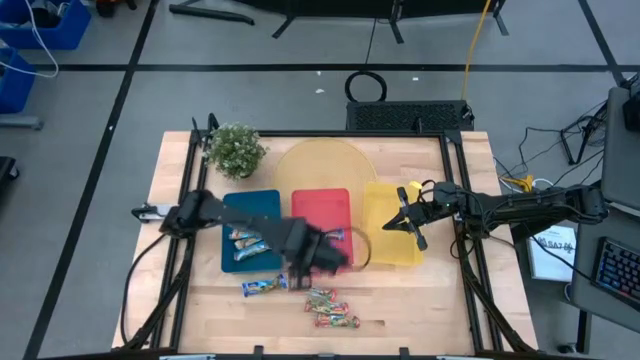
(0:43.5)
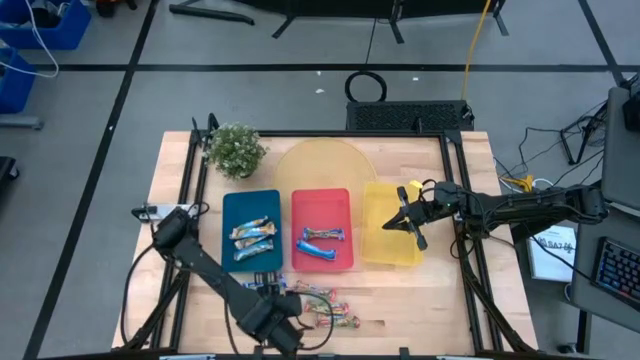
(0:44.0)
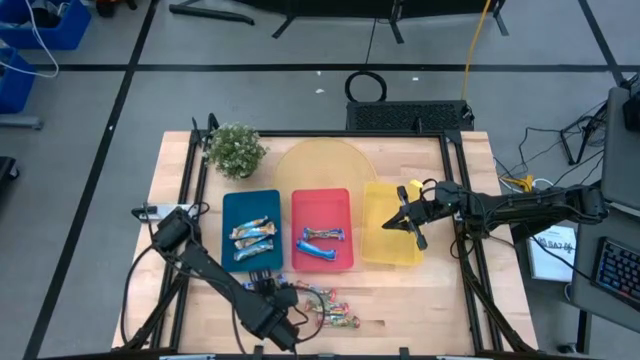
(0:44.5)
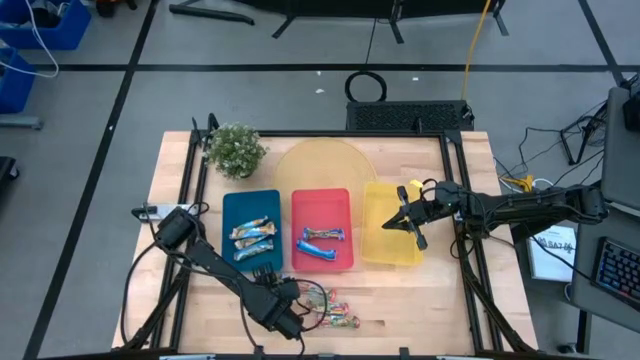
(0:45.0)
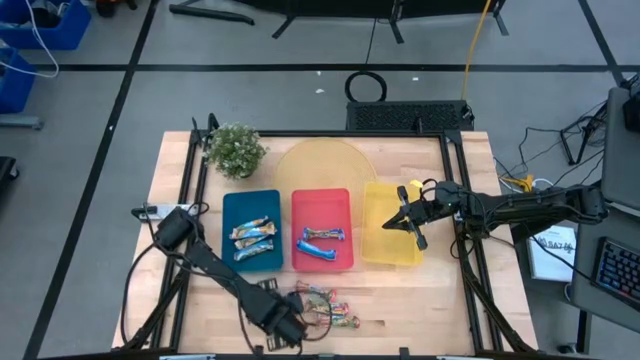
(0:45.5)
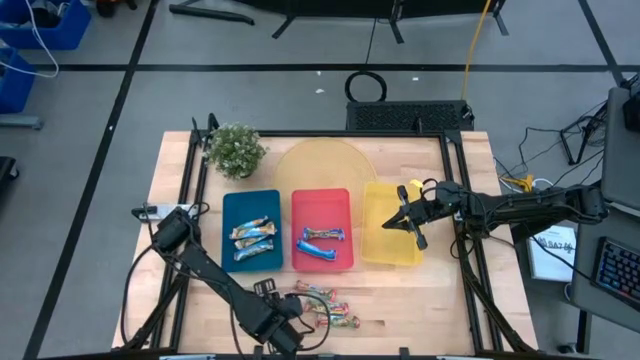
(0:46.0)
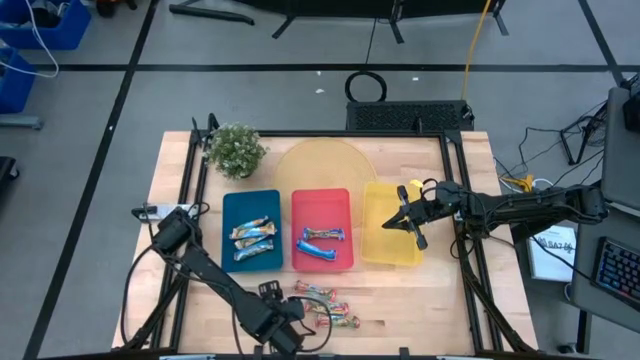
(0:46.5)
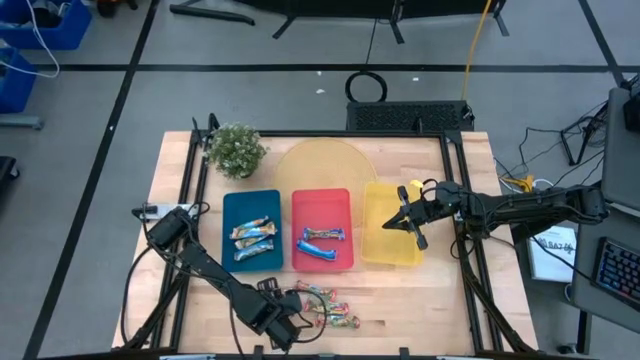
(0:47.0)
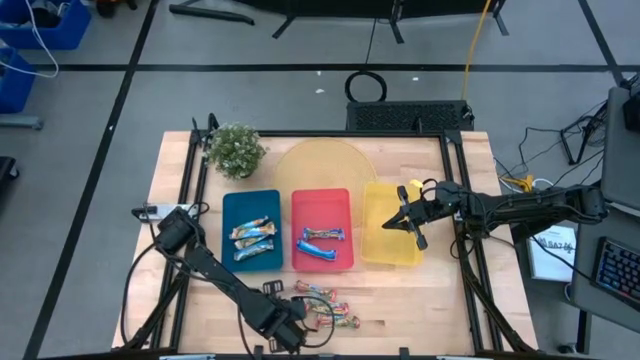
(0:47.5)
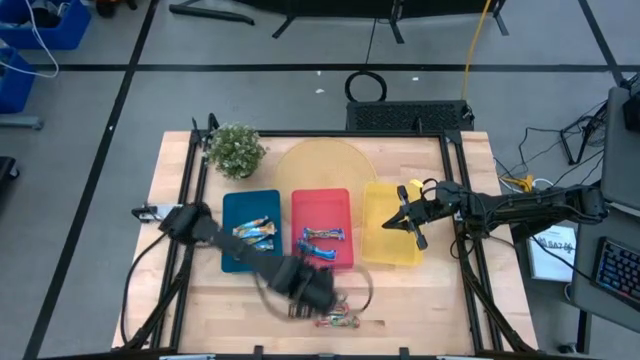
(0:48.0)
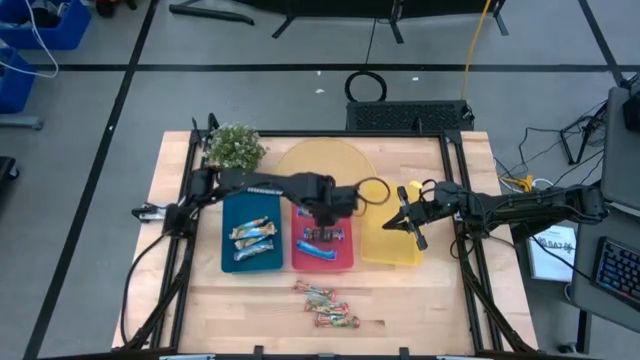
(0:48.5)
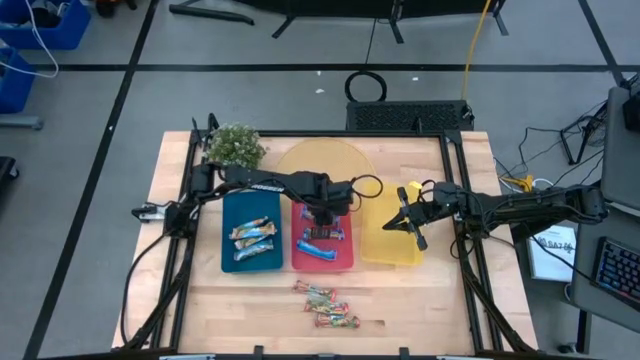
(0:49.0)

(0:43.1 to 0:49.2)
Task: Pick and place Granola Bars by type
Put the blue granola bar into the pink bin

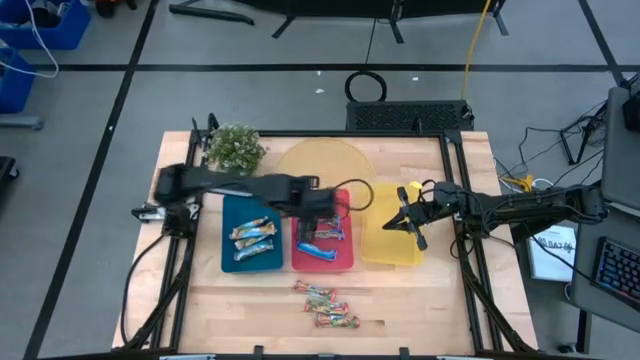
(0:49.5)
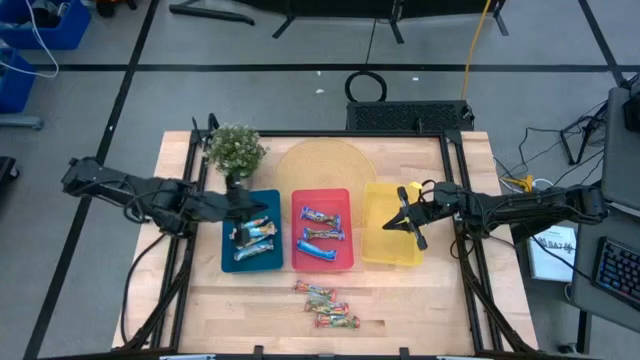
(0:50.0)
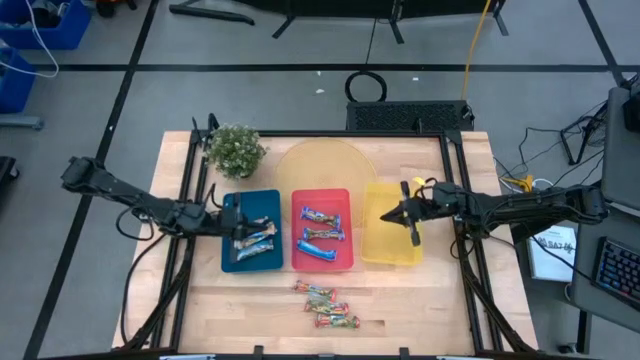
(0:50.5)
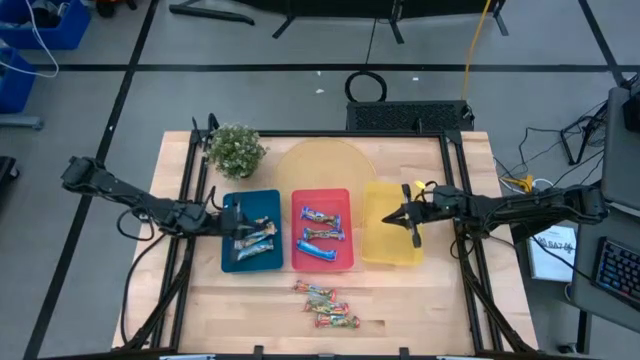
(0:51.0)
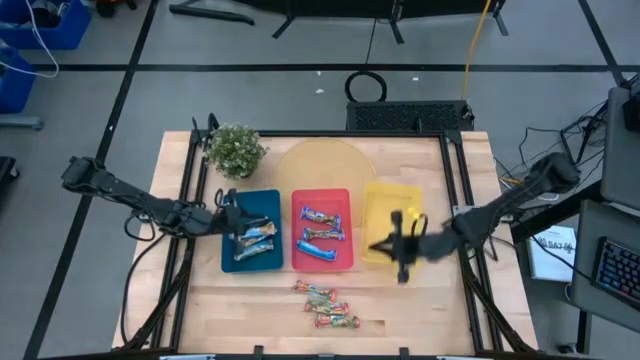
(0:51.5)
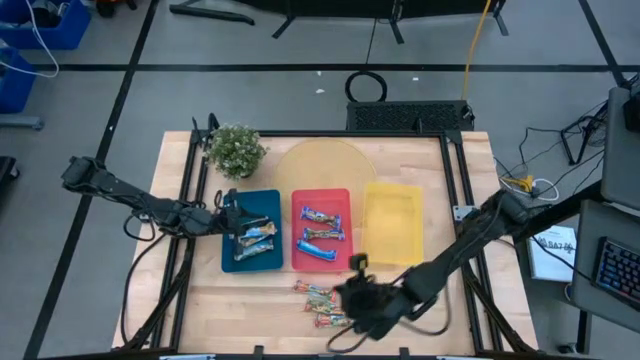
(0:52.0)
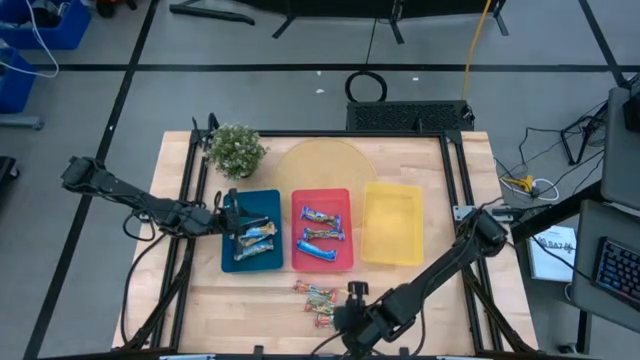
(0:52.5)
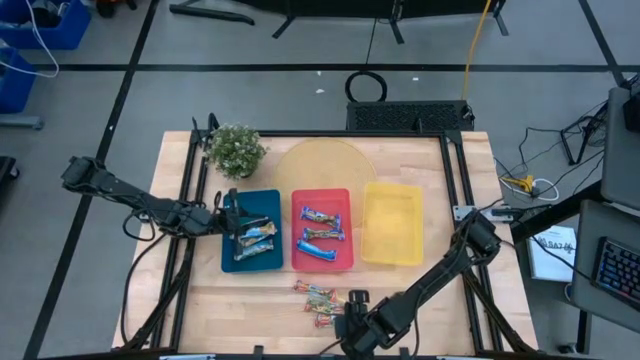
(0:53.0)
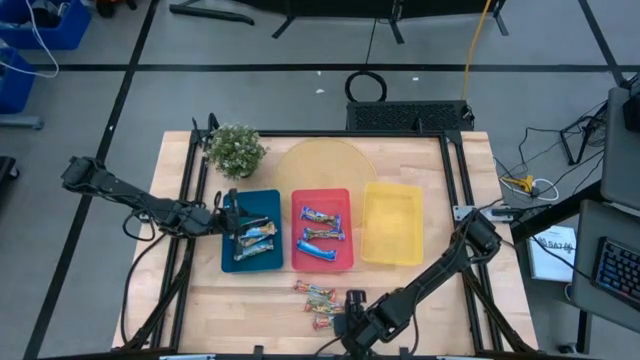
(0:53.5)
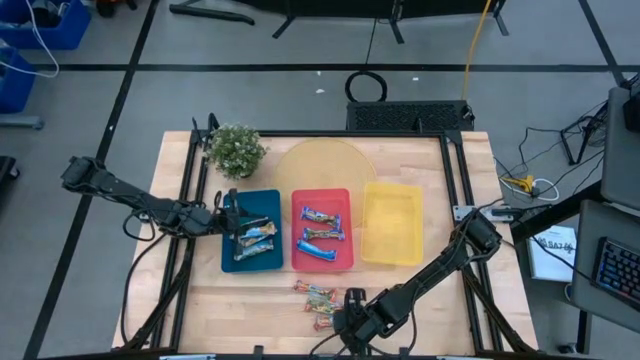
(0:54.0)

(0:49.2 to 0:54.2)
Put the red granola bar into the yellow bin

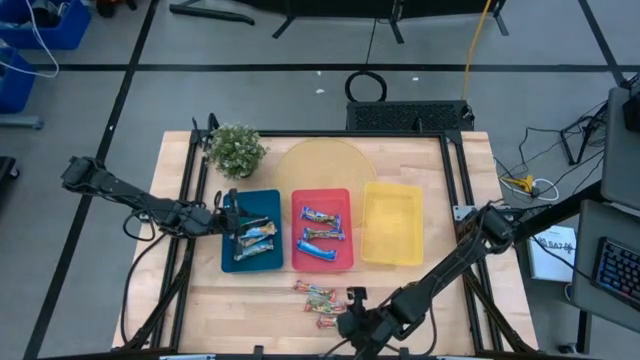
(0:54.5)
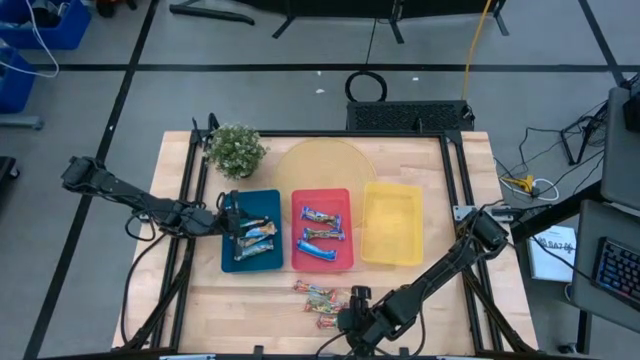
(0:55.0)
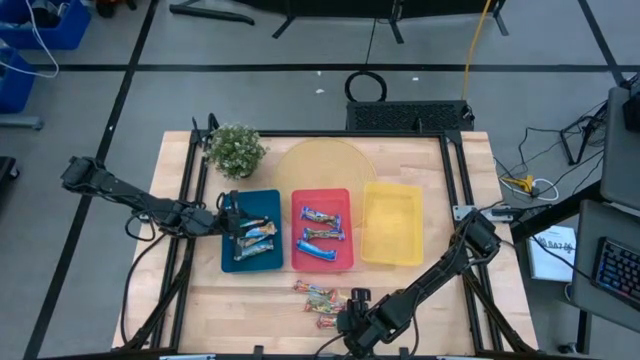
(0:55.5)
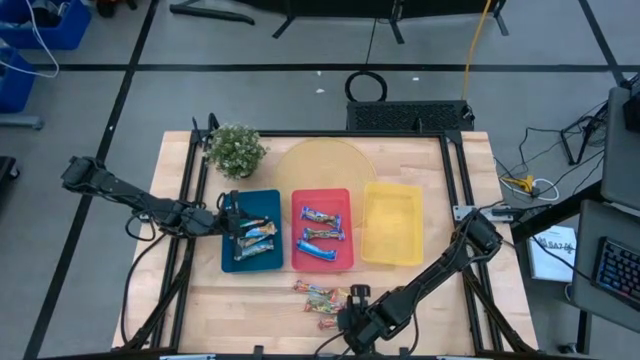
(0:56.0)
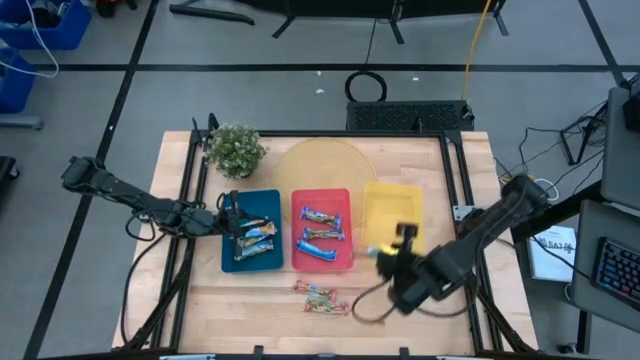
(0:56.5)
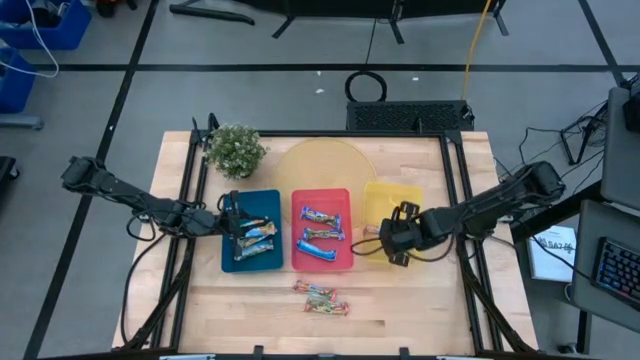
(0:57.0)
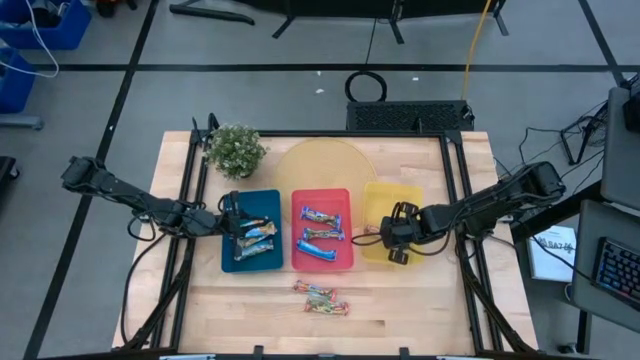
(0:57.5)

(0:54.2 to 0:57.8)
Put the red granola bar into the yellow bin

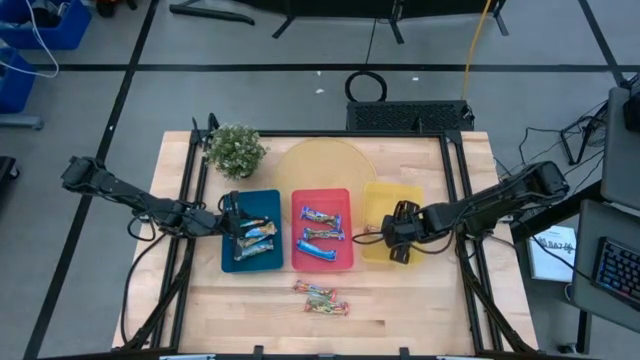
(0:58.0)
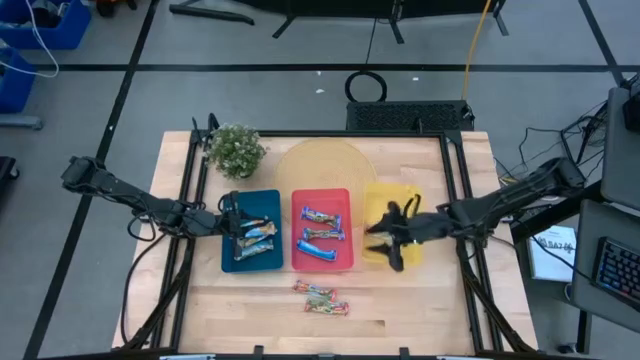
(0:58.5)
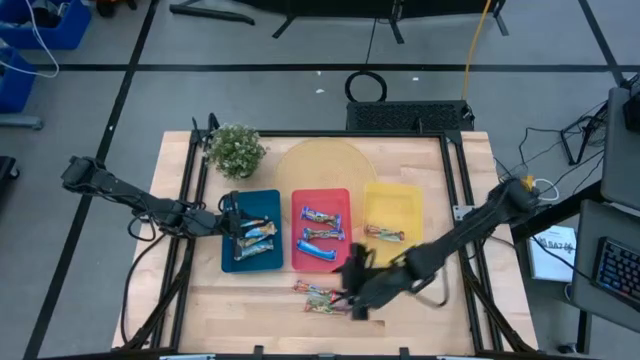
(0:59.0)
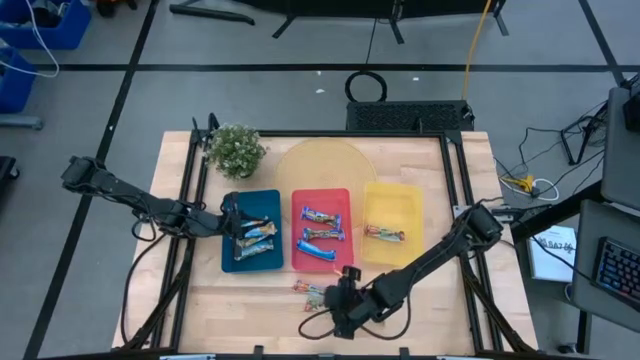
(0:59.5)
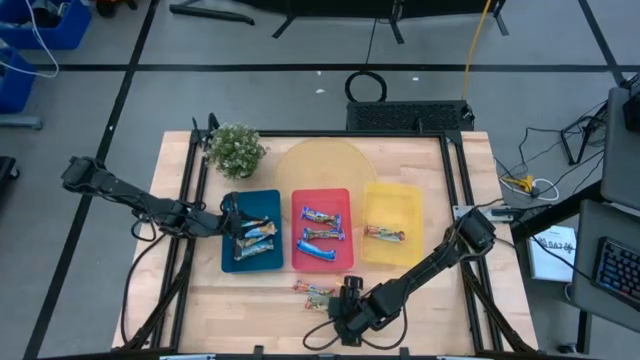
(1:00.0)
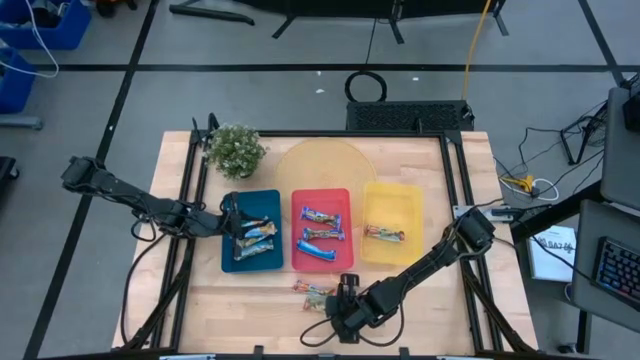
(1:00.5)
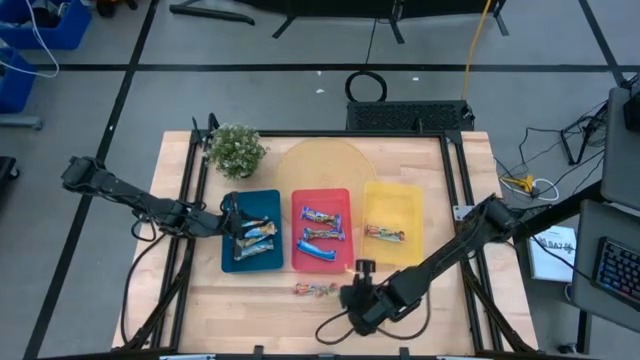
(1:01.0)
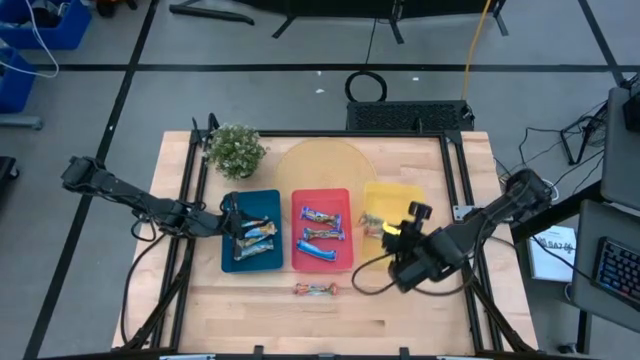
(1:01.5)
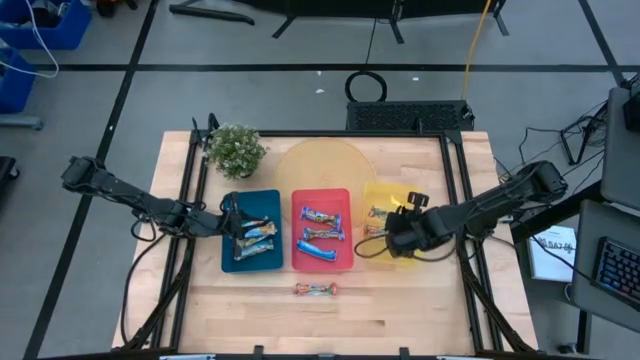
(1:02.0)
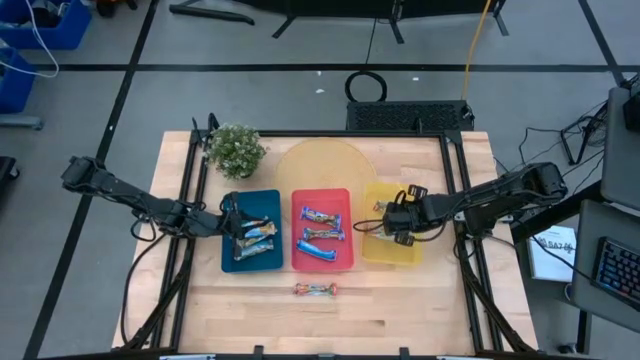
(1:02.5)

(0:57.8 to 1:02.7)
Put the red granola bar into the yellow bin

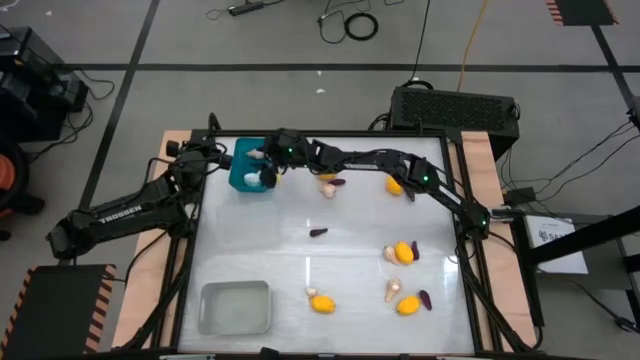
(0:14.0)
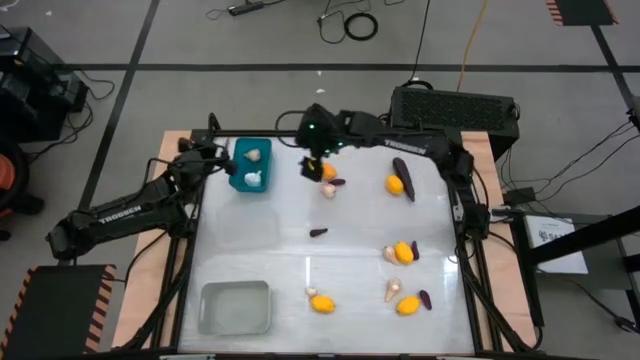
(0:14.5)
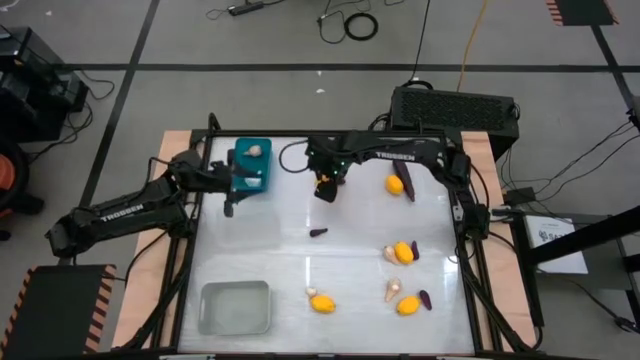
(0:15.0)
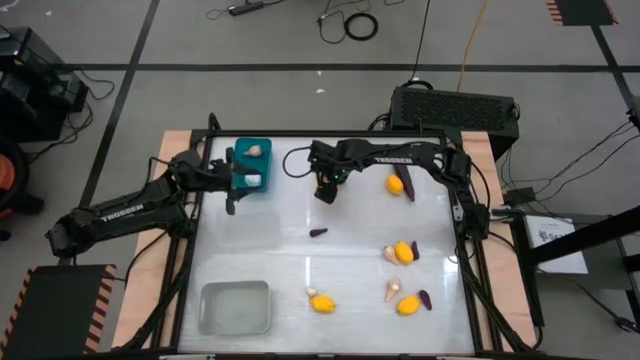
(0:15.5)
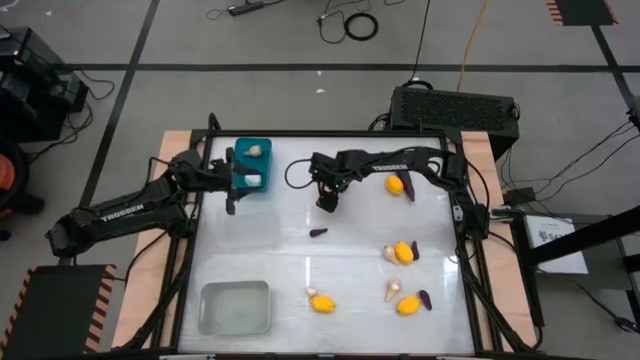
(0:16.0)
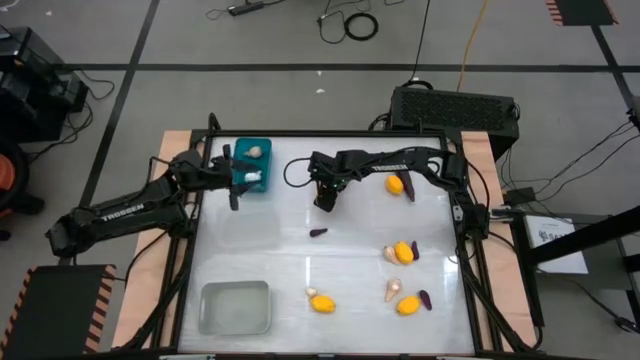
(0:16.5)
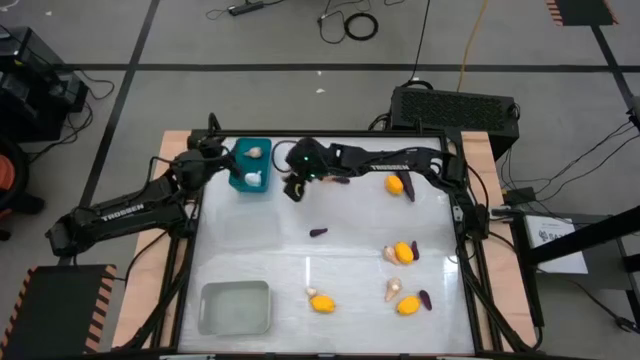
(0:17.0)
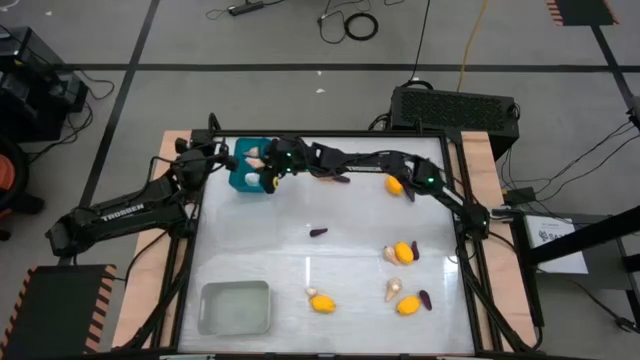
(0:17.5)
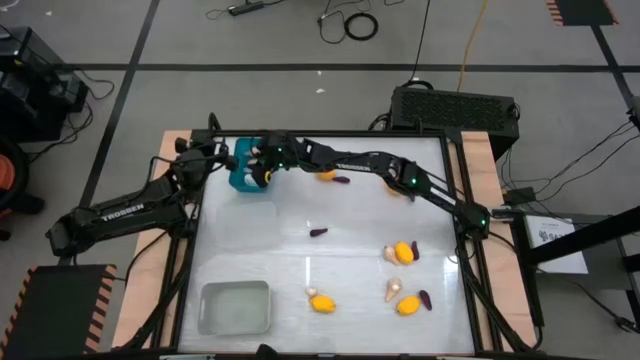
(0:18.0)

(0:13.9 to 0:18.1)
Task: Sort produce into baskets
Put the garlic into the blue bin
